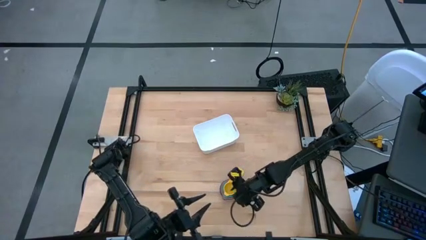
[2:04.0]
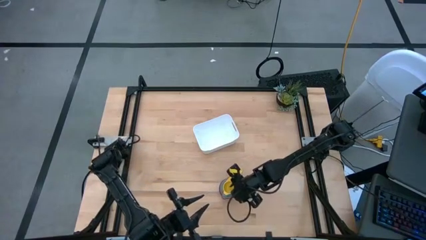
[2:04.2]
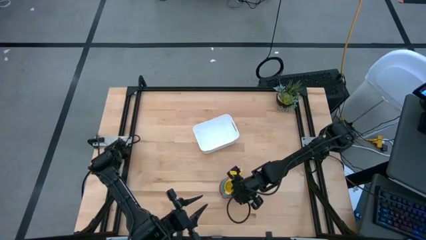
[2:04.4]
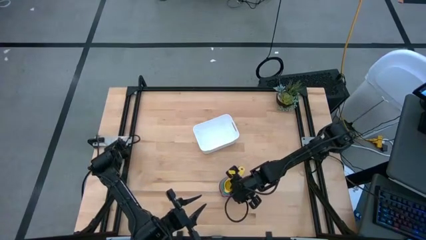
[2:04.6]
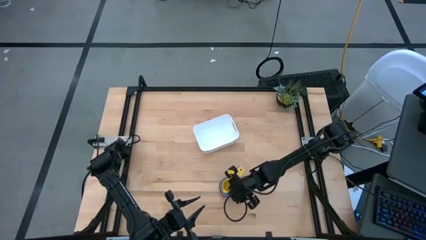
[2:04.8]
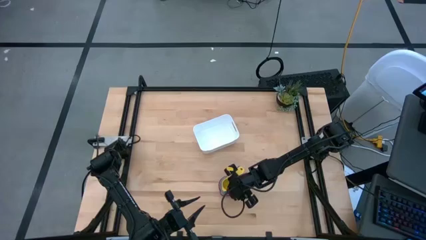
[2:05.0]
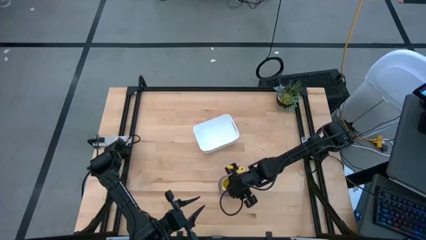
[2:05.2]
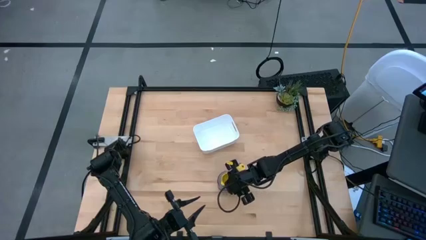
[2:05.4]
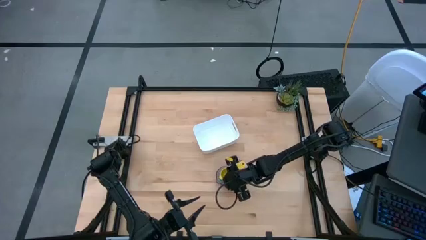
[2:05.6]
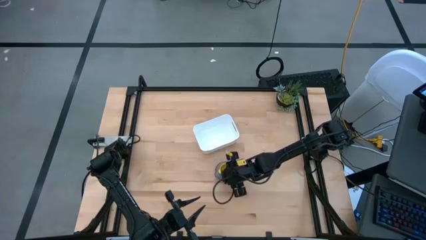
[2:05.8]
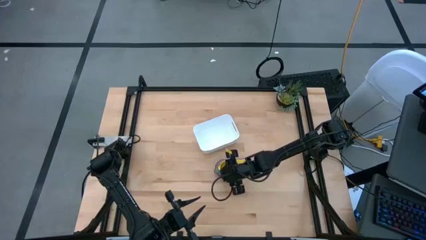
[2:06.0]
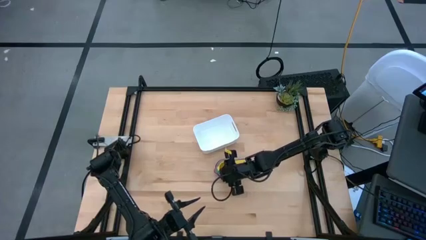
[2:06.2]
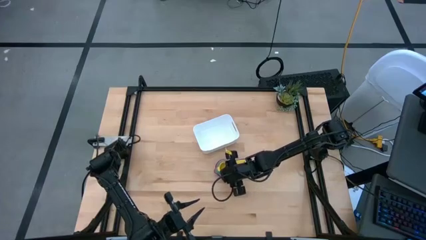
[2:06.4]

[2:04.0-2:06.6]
Task: Nest measuring cups in basket
Adjust the stacked measuring cups closer to the bin

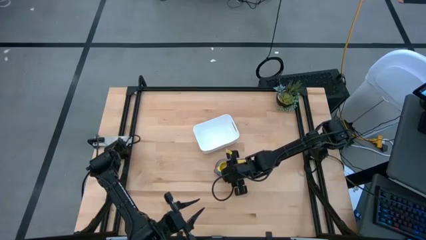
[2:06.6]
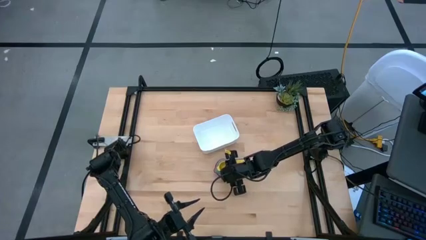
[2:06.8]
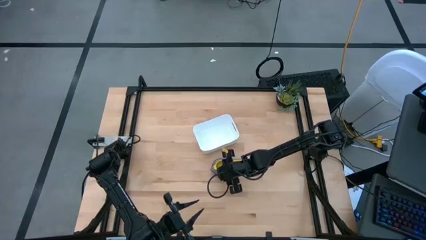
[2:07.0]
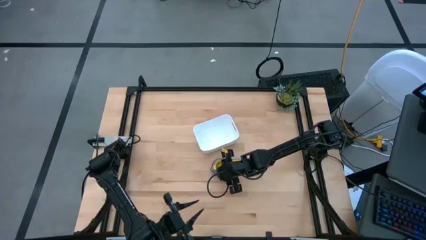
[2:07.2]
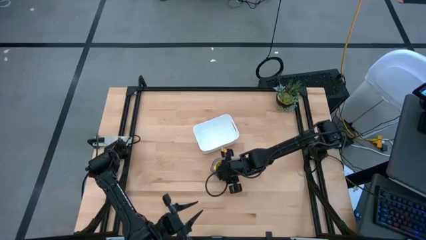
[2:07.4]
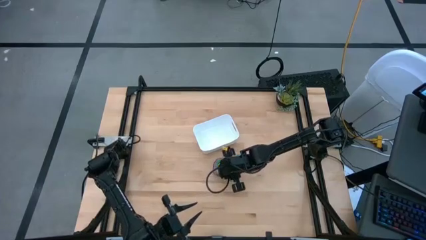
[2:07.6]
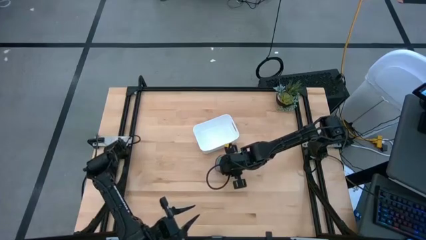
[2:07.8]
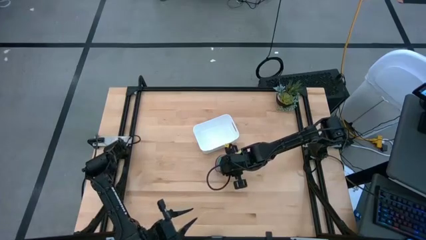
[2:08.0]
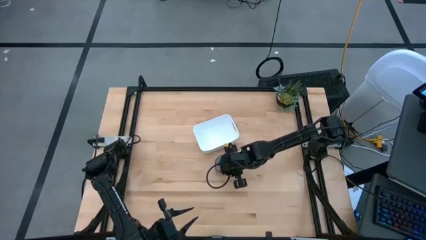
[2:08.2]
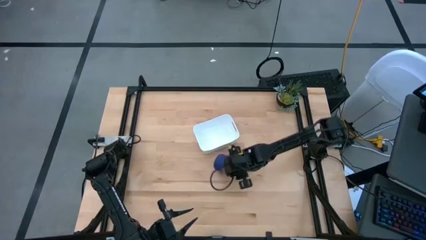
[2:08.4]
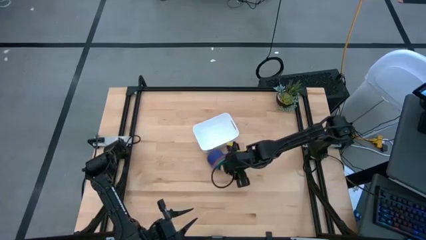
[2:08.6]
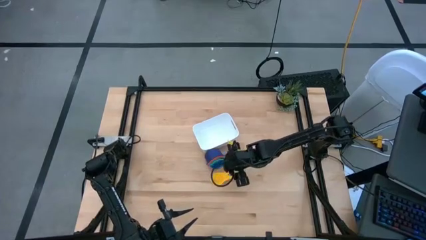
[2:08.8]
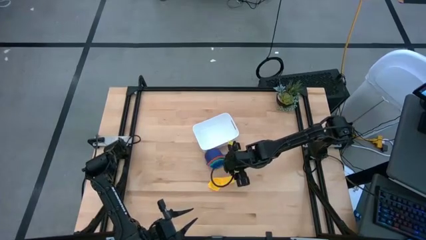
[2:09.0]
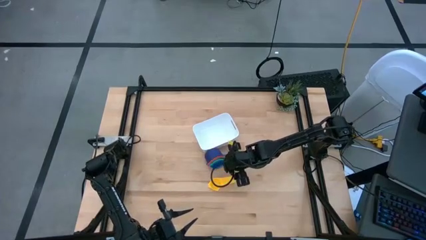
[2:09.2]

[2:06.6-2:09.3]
Put the stacked measuring cups into the bin

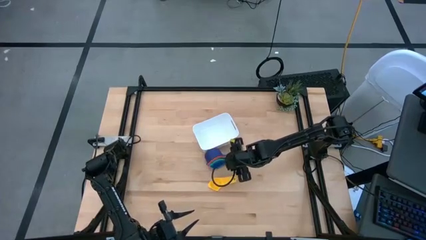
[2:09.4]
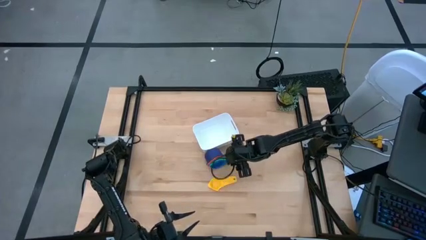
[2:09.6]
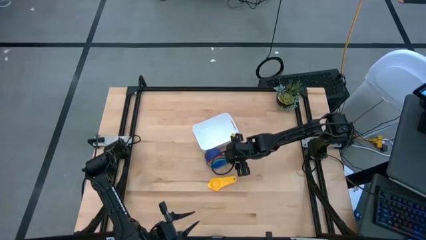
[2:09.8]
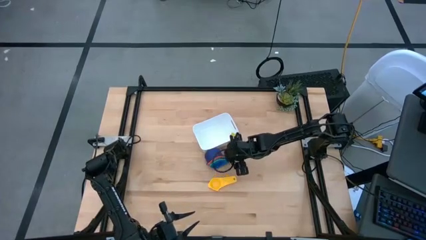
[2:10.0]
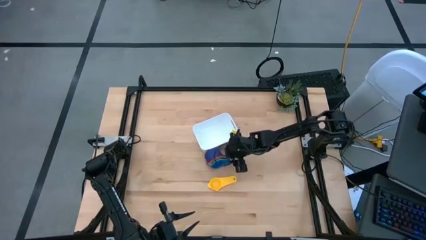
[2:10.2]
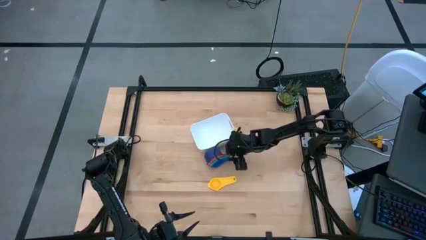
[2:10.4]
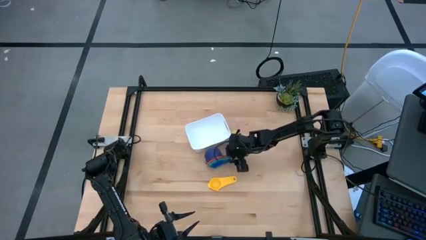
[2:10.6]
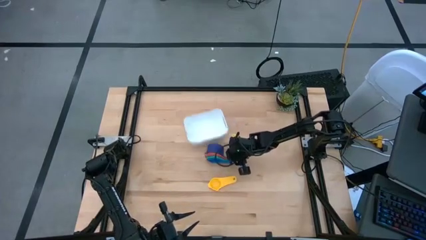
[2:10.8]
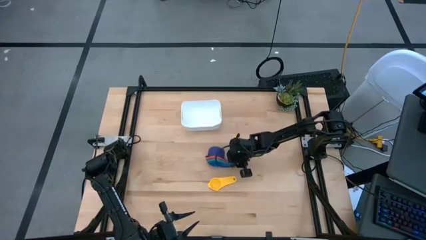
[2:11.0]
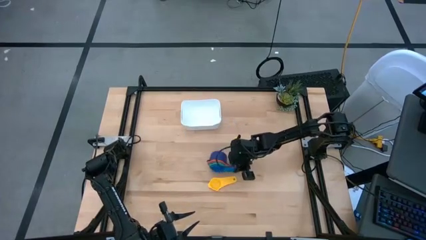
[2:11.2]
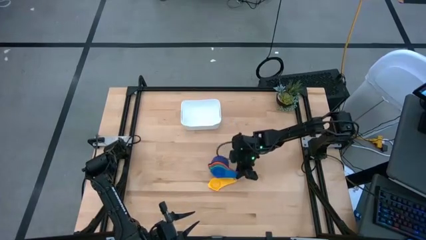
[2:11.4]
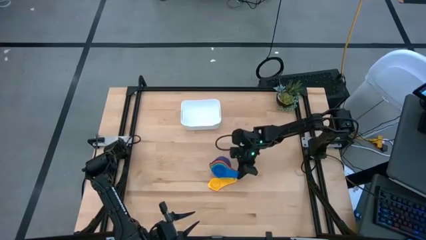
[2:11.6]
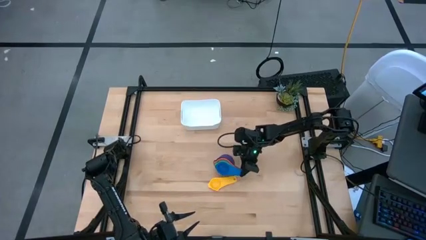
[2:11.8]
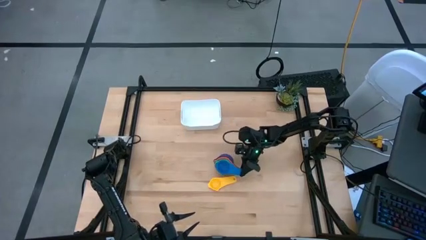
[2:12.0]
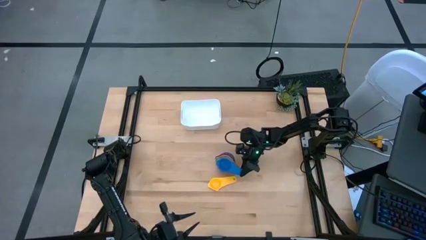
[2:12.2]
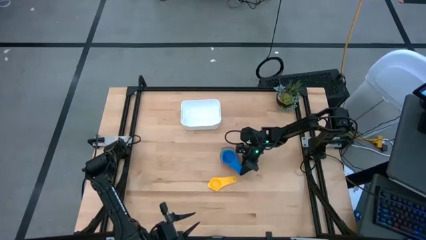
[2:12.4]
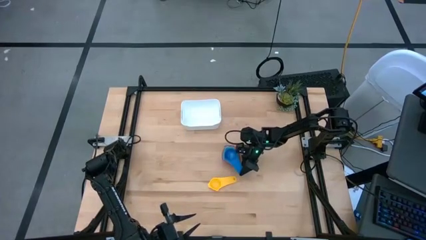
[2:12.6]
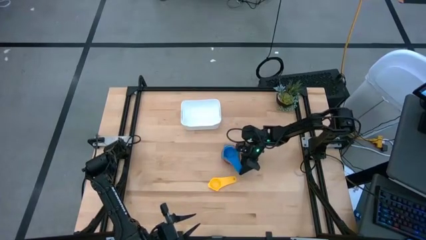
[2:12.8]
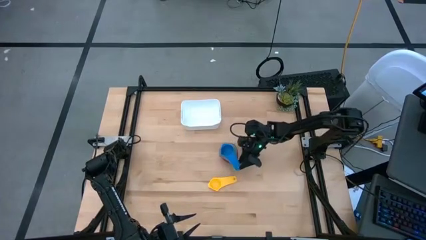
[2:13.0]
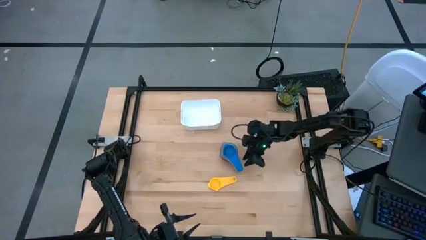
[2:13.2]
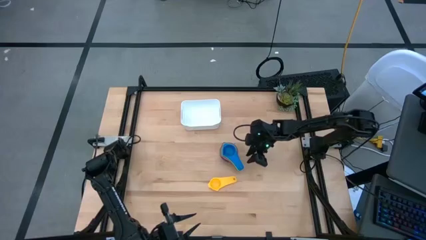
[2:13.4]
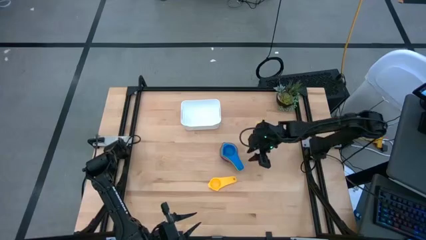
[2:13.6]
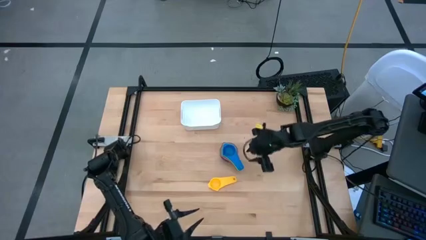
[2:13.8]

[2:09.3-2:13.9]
Adjust the stacked measuring cups on the table
